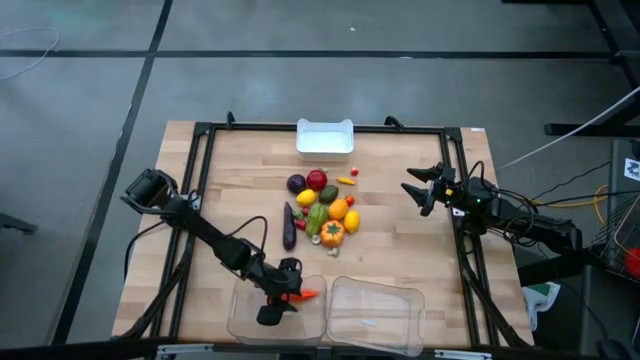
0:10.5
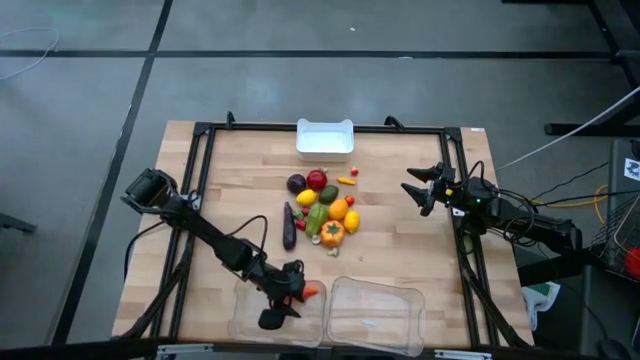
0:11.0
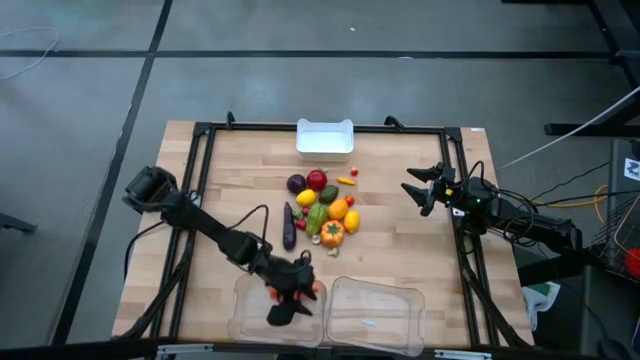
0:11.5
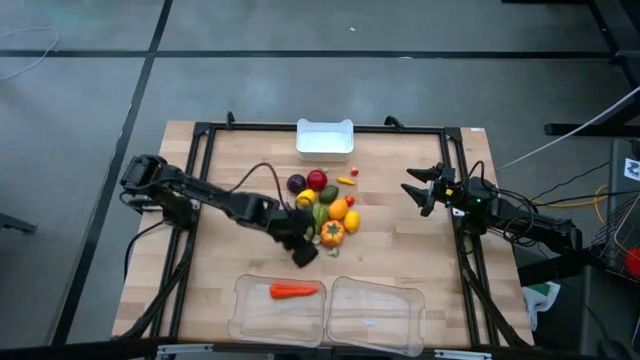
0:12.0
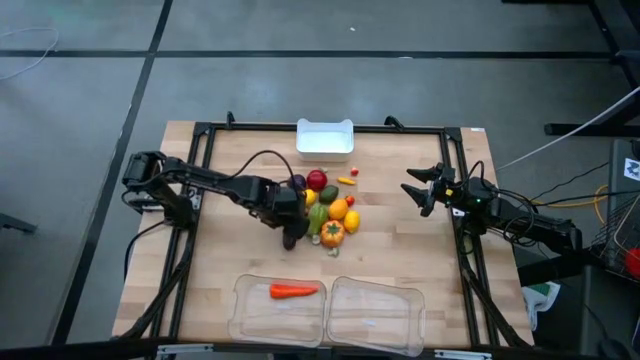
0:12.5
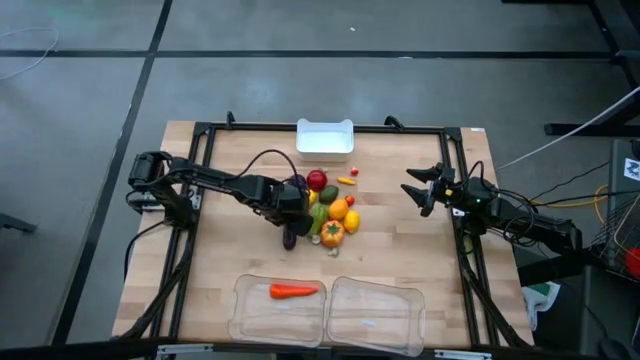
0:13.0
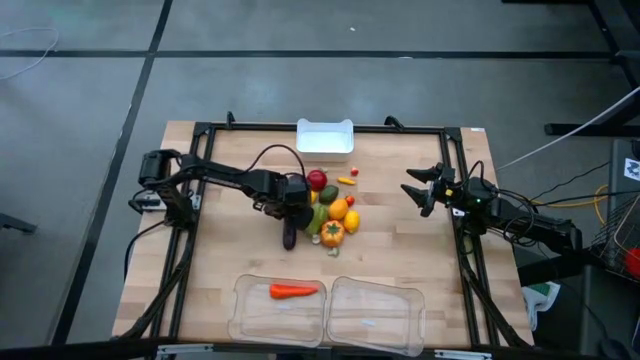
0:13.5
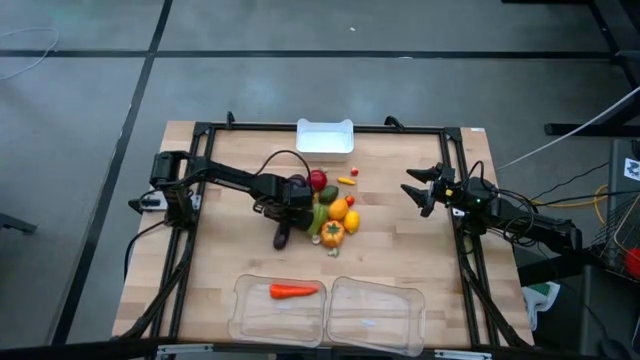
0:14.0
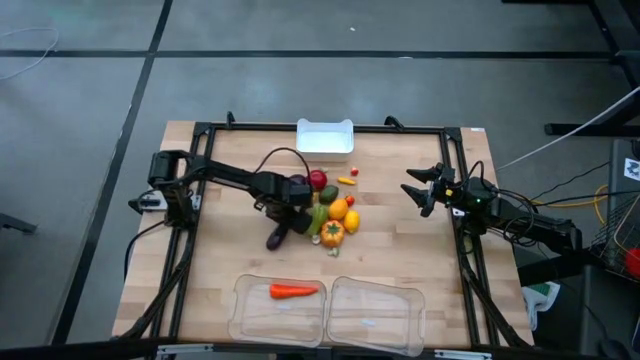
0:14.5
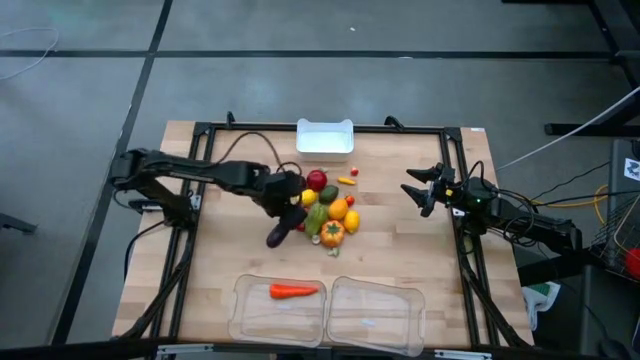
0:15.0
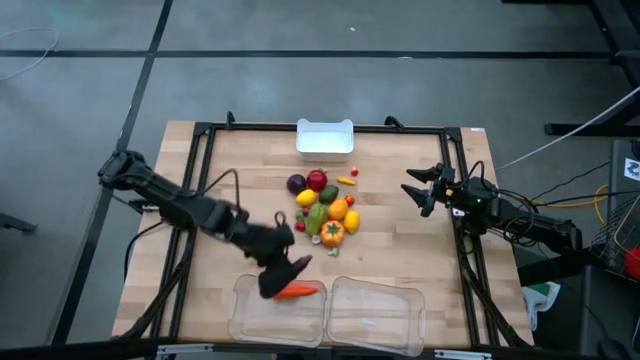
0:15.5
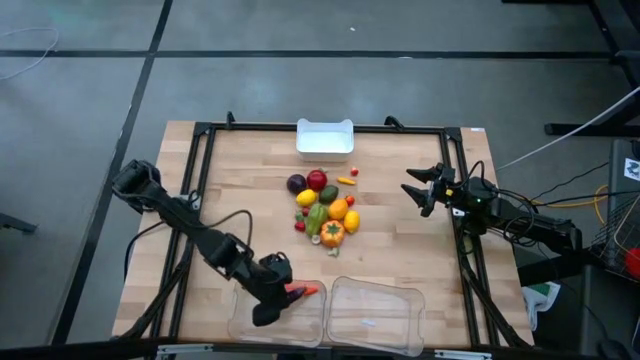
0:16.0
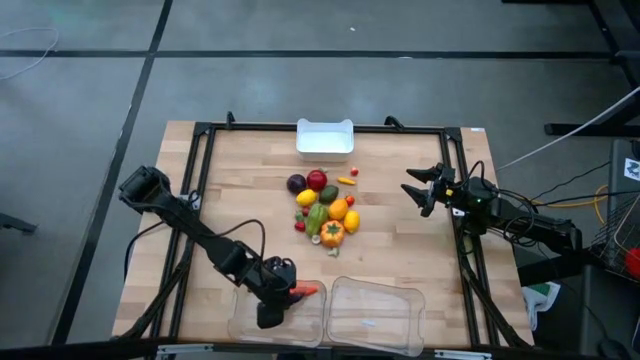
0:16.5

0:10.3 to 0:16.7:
Task: Sort produce into baskets
Put the eggplant into the left transparent bin

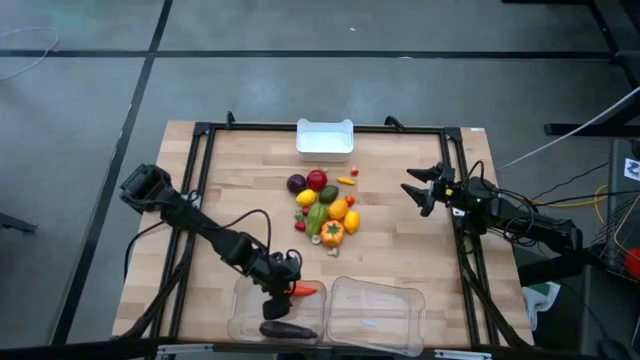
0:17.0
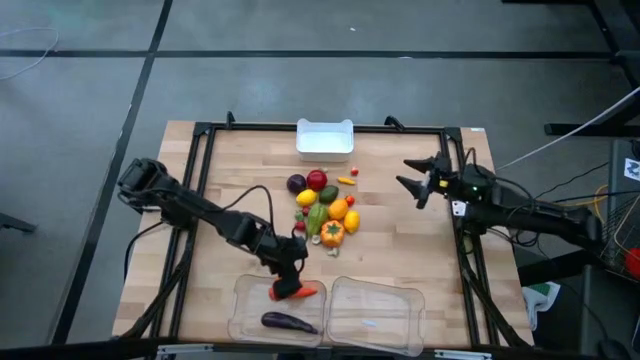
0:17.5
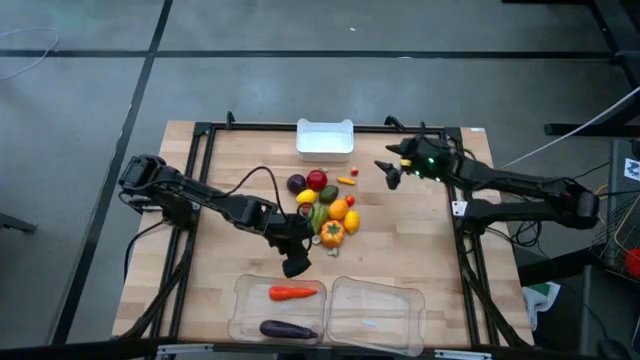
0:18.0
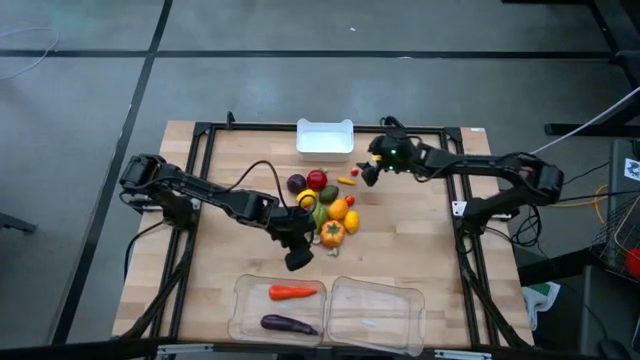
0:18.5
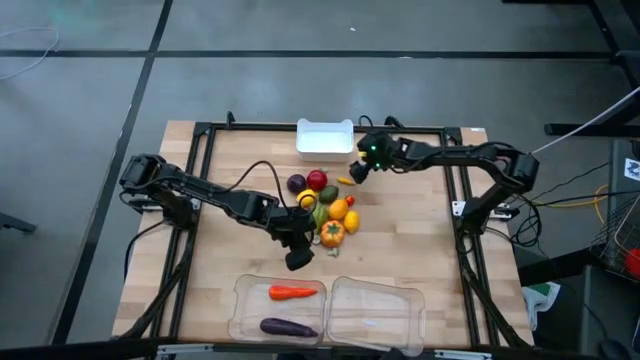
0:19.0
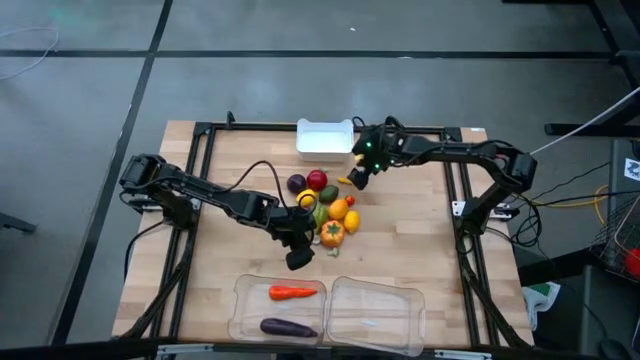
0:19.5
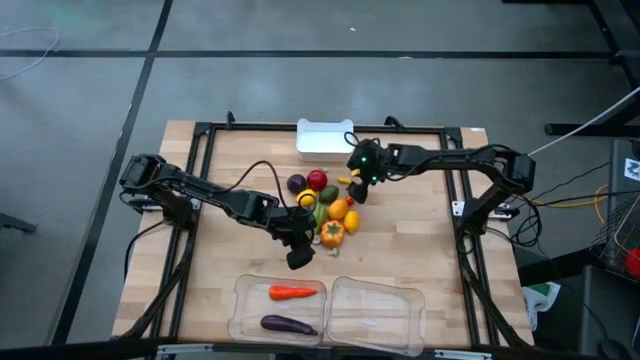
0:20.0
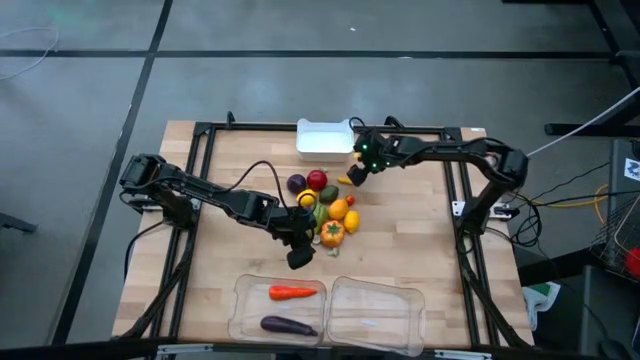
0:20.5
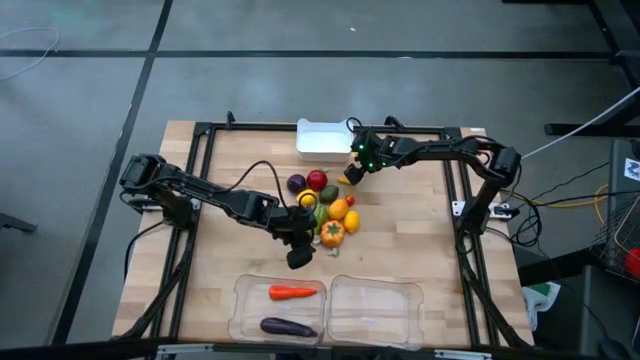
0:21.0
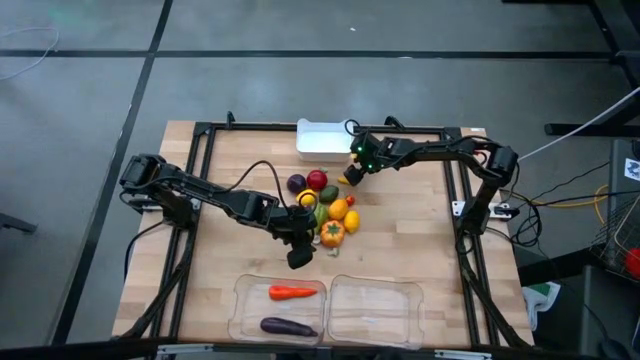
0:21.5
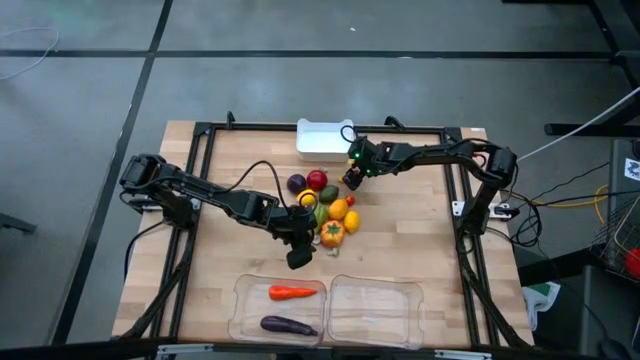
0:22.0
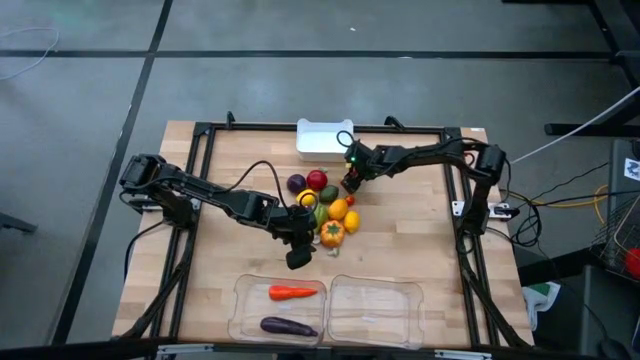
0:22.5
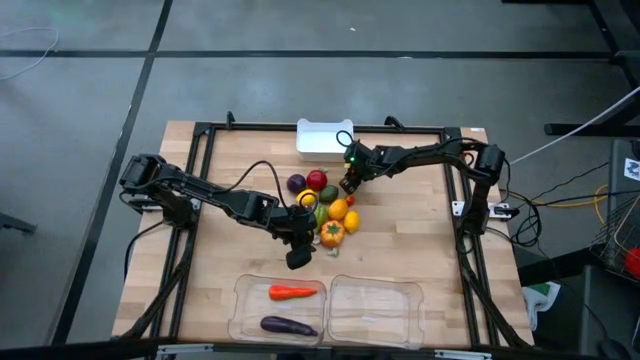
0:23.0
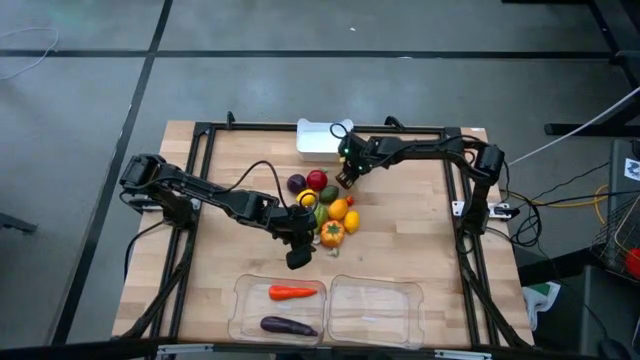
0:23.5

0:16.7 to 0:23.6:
Put the orange mushroom into the white bin

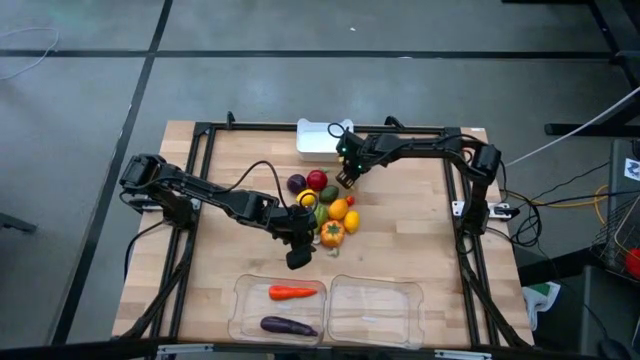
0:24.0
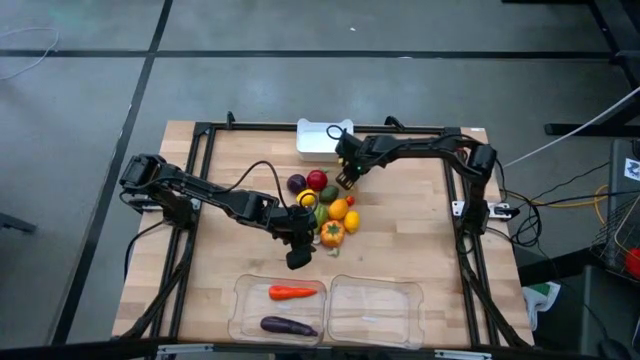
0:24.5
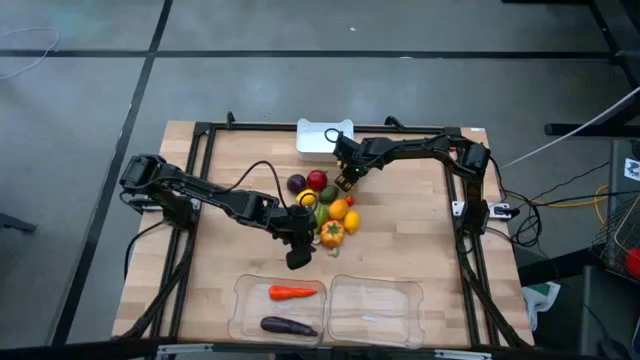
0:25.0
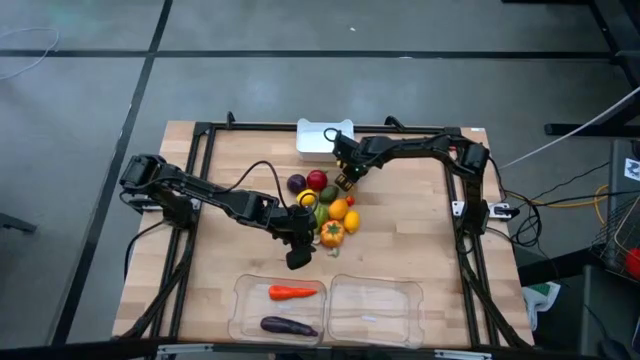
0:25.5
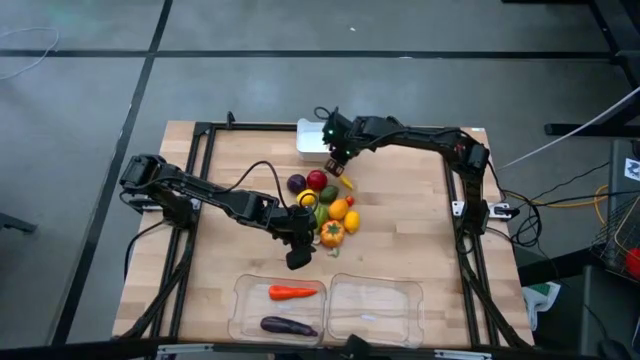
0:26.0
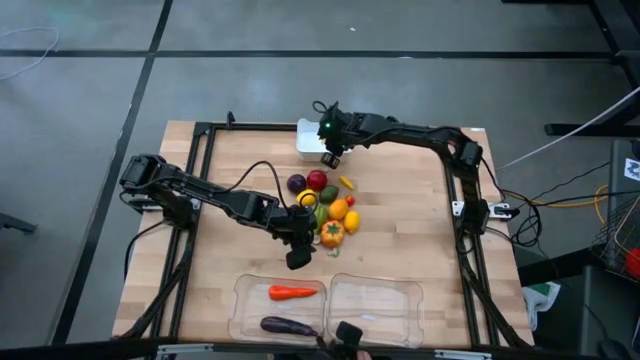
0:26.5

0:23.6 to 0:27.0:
Put the orange mushroom into the white bin

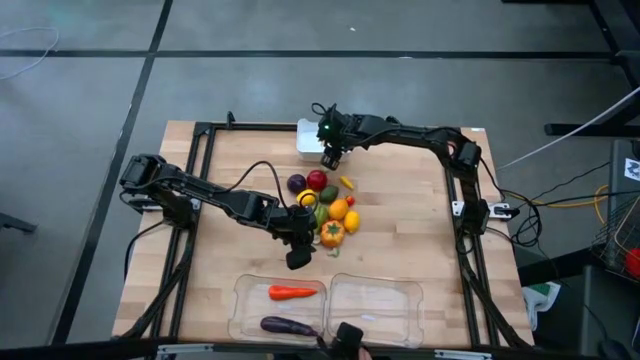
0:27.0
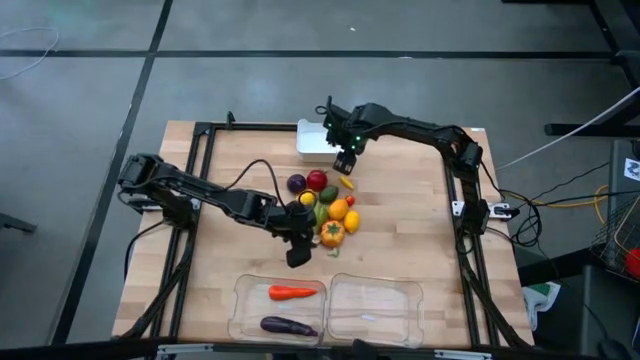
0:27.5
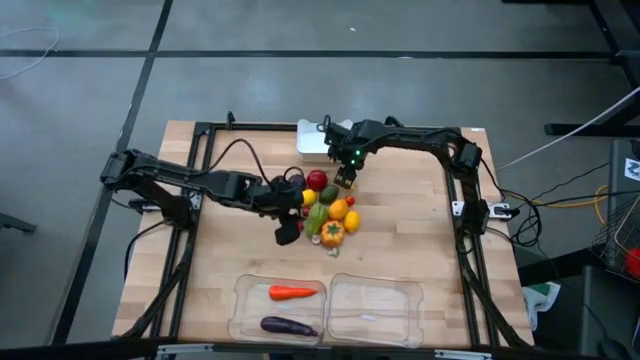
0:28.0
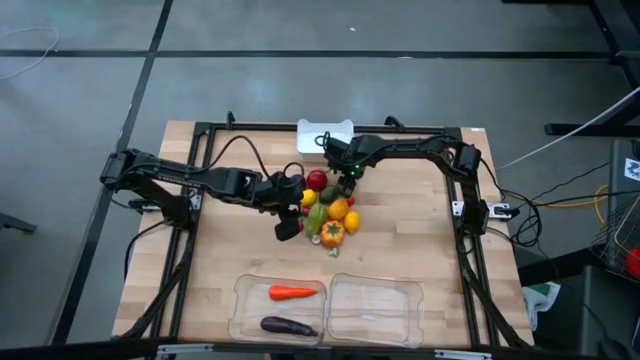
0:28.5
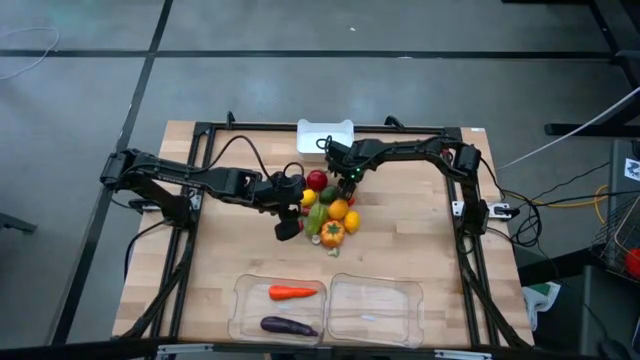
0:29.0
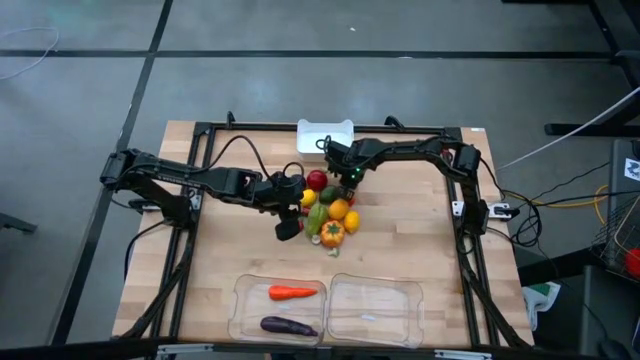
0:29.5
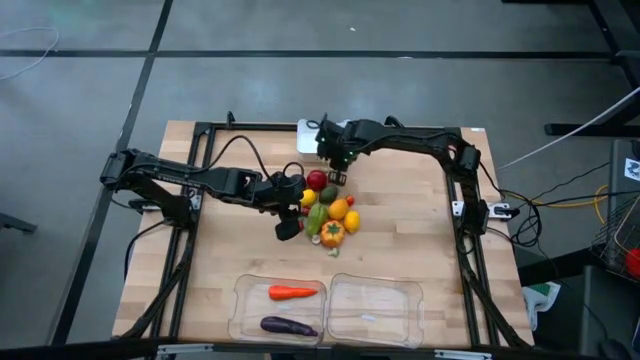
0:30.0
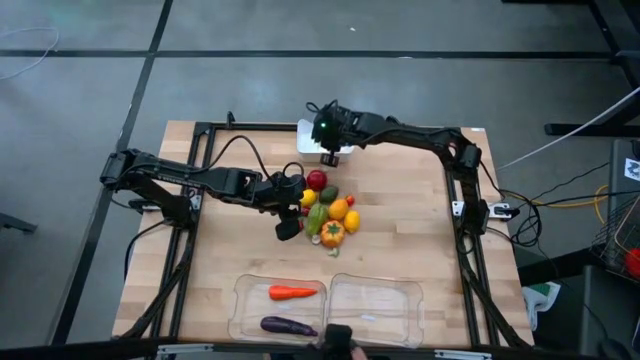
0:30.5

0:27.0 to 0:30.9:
Put the yellow chili pepper into the white bin
